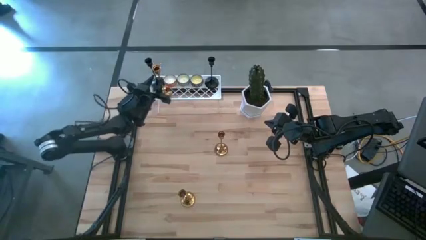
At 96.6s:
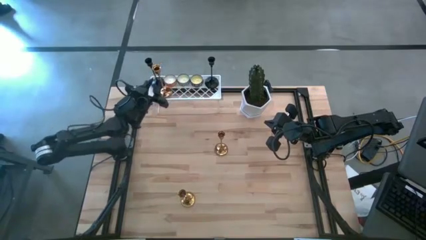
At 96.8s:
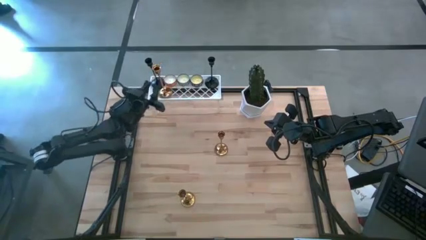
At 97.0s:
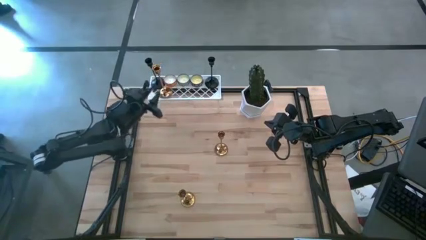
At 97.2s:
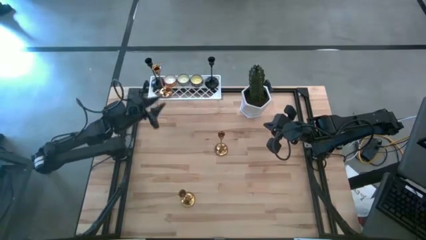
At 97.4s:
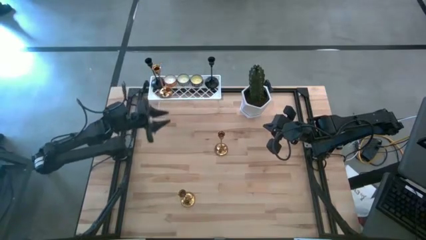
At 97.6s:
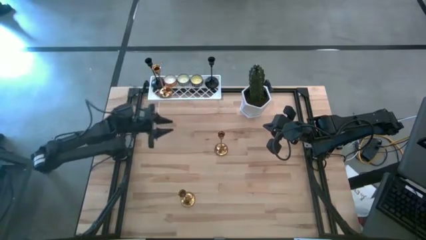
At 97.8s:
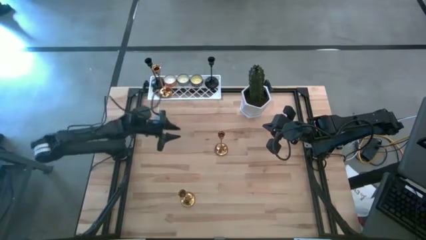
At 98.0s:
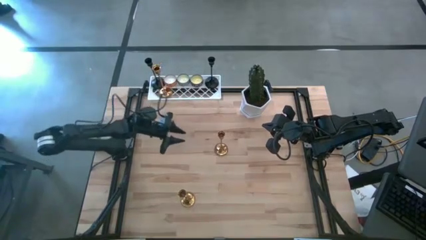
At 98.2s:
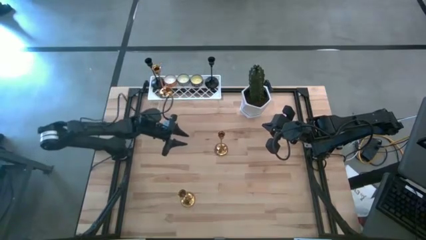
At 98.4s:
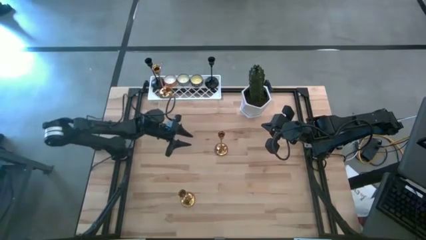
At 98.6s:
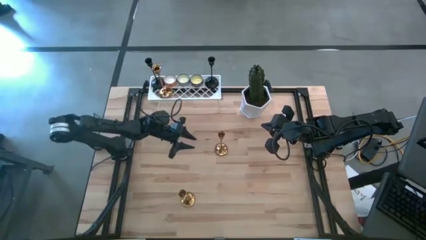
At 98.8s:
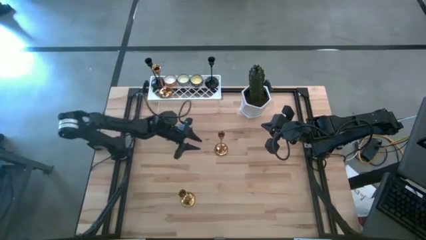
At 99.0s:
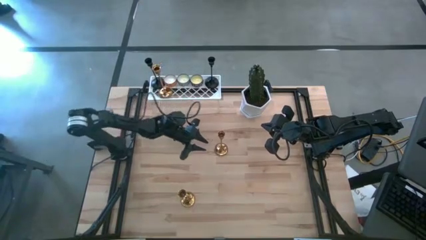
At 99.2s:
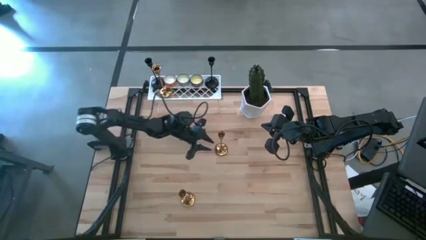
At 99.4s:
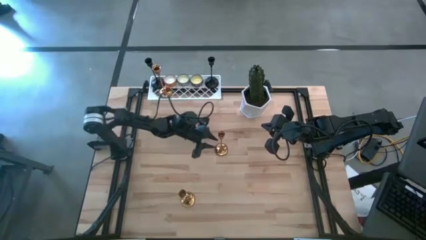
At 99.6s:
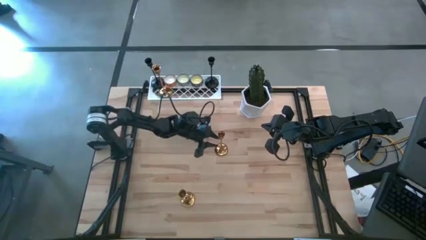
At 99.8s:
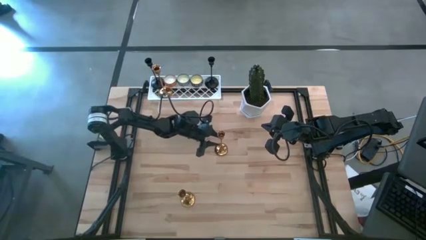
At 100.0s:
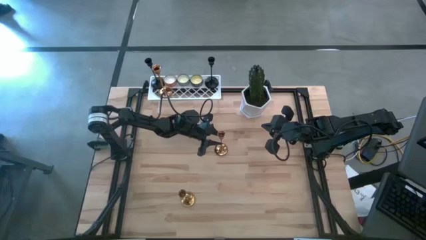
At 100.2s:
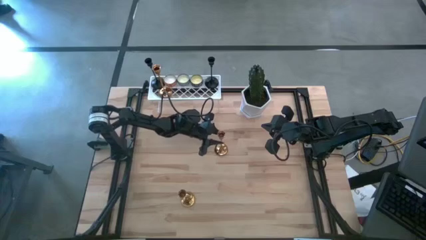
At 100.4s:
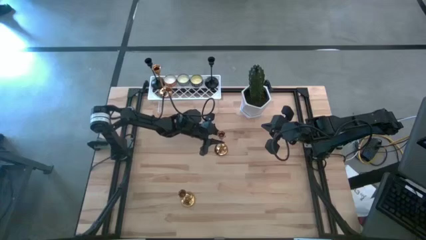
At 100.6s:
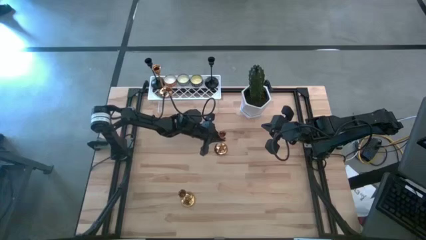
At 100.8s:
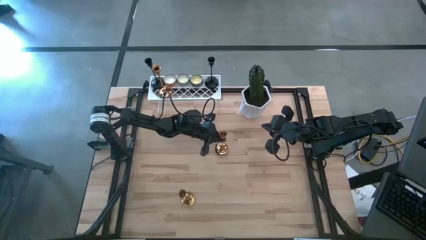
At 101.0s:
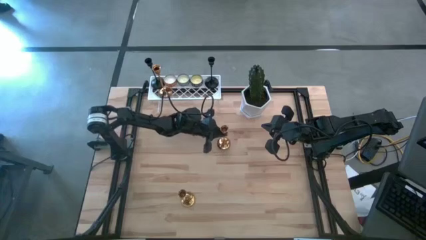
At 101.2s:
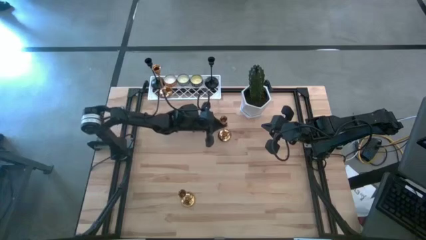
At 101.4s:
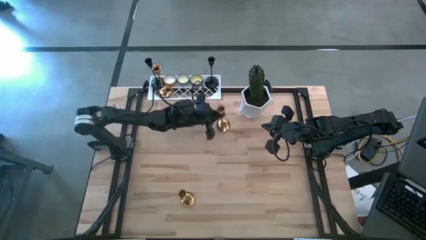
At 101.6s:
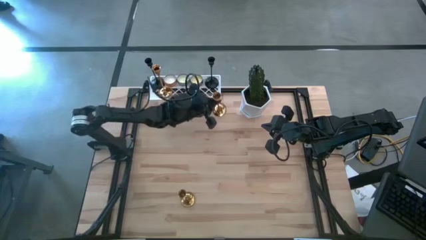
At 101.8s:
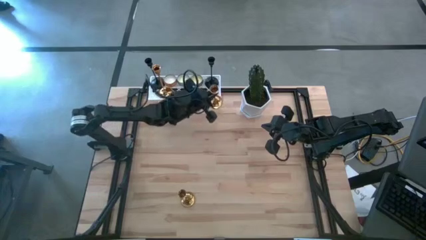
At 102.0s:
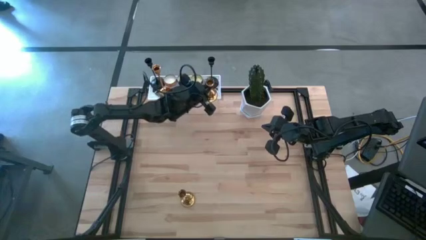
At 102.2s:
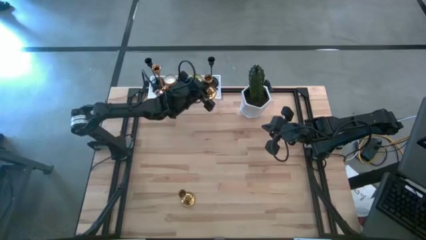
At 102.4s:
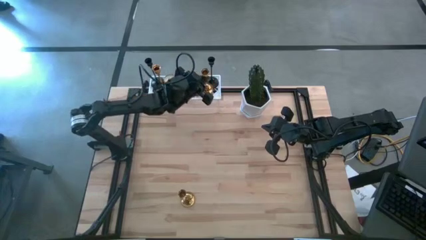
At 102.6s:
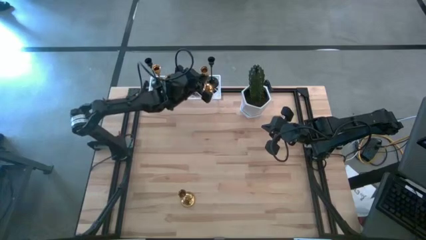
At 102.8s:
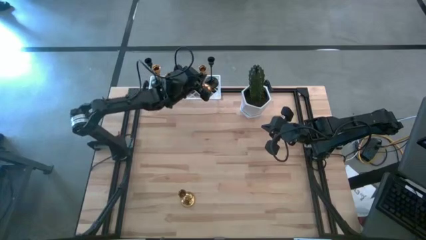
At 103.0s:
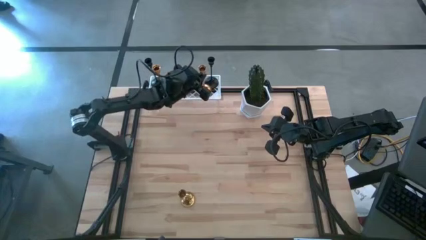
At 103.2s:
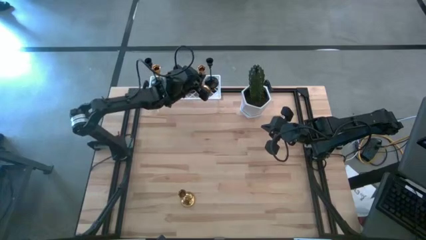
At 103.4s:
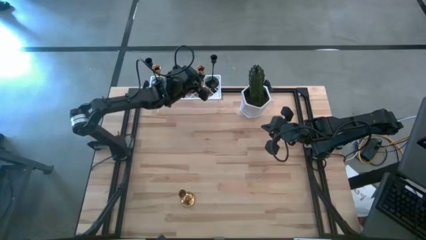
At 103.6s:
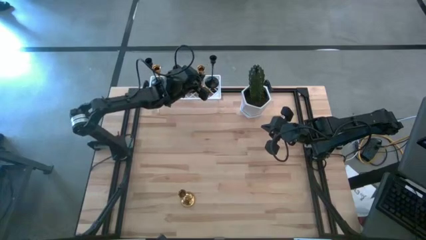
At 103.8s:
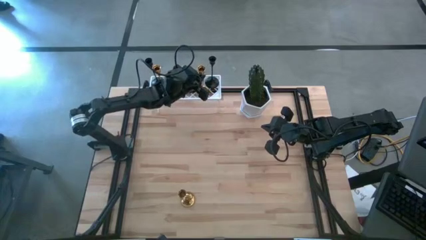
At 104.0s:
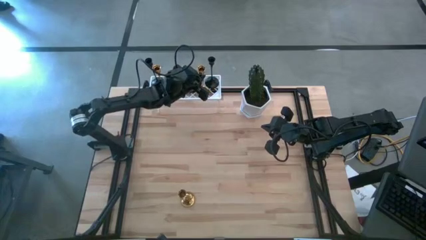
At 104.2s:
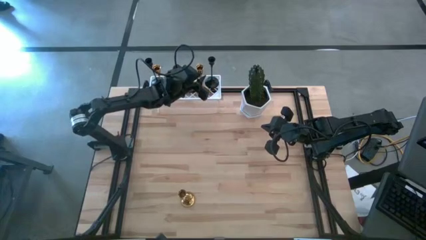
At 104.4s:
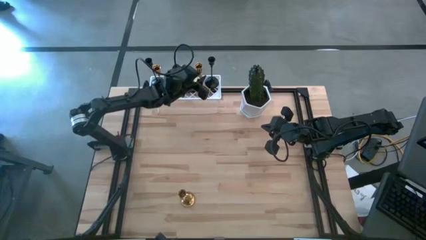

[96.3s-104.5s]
Task: Pick & Place candle stick holders
Put the top golden candle holder on the shelf

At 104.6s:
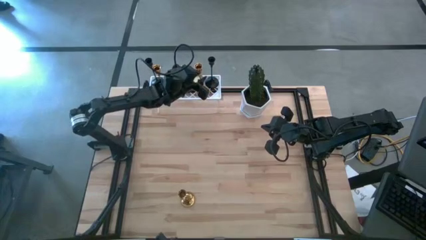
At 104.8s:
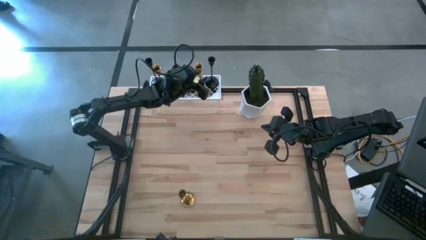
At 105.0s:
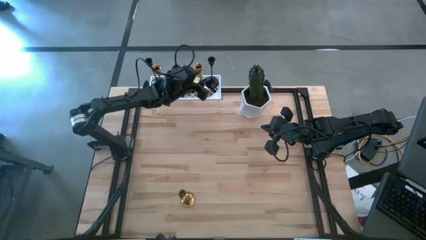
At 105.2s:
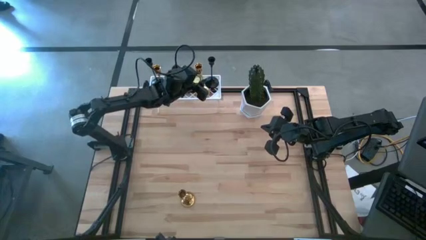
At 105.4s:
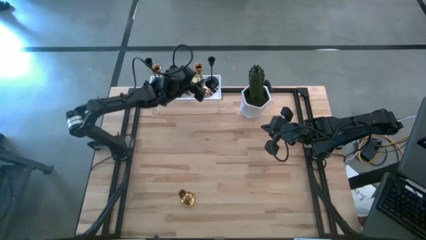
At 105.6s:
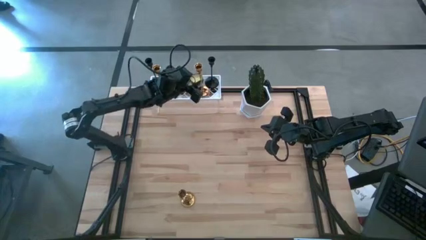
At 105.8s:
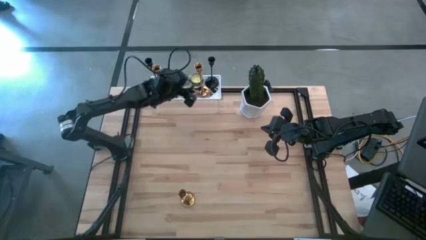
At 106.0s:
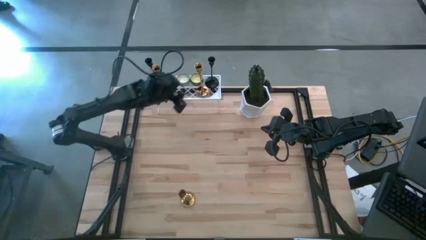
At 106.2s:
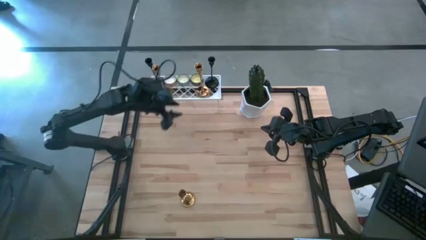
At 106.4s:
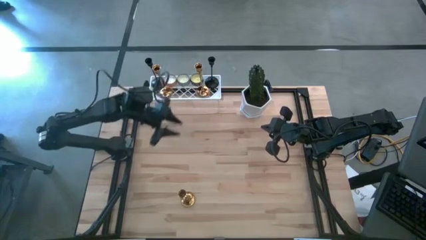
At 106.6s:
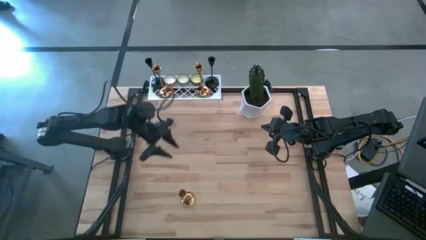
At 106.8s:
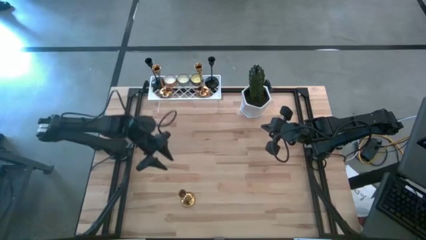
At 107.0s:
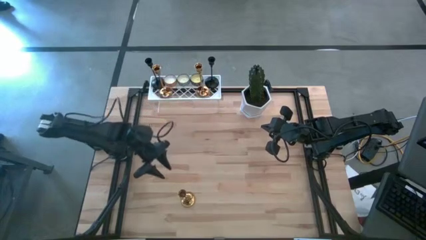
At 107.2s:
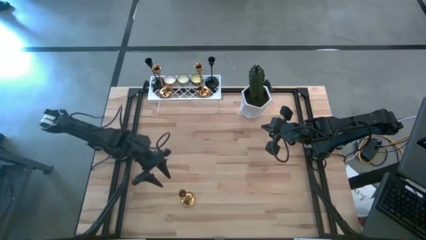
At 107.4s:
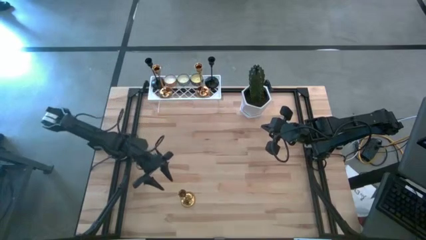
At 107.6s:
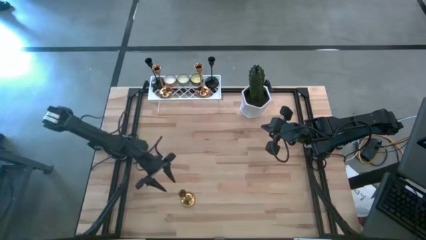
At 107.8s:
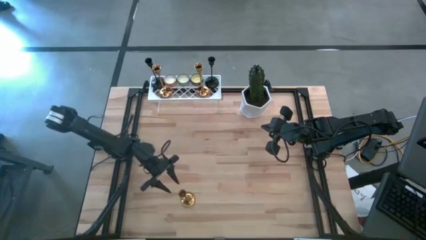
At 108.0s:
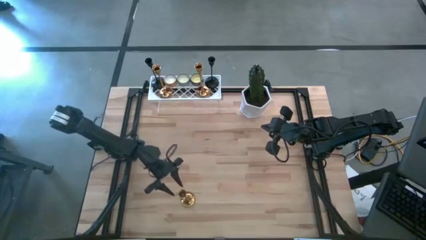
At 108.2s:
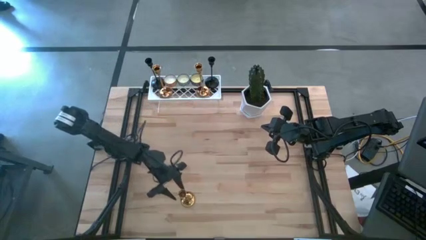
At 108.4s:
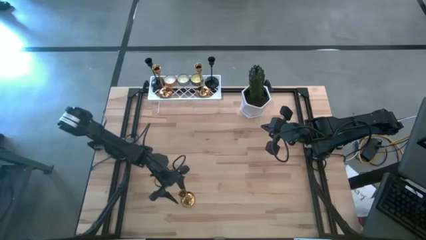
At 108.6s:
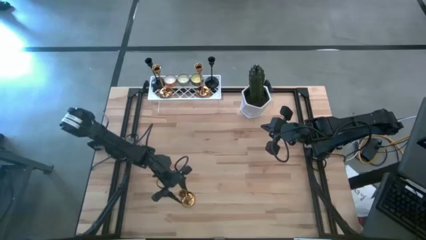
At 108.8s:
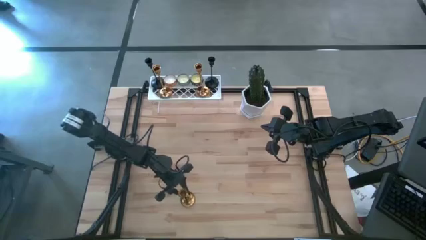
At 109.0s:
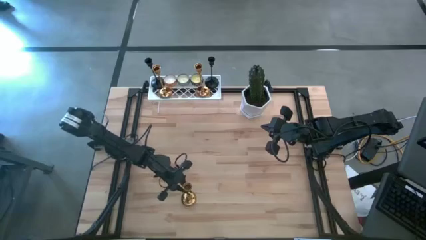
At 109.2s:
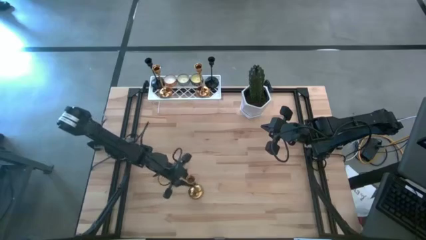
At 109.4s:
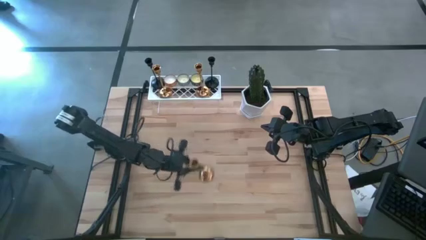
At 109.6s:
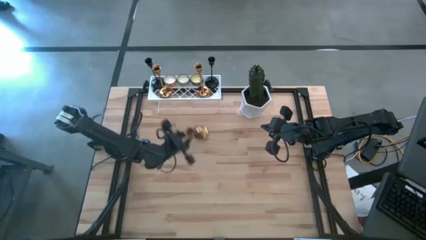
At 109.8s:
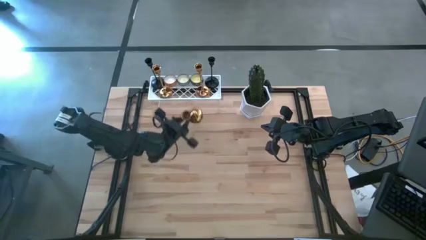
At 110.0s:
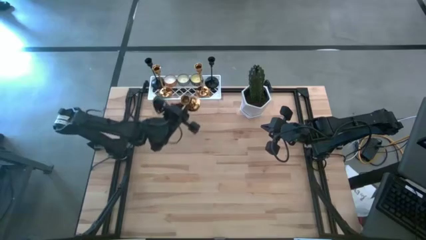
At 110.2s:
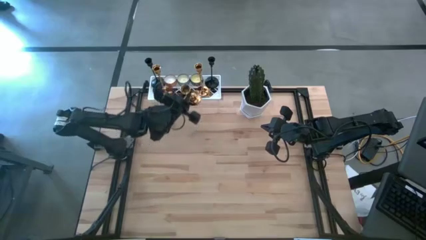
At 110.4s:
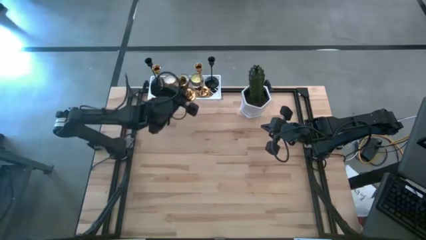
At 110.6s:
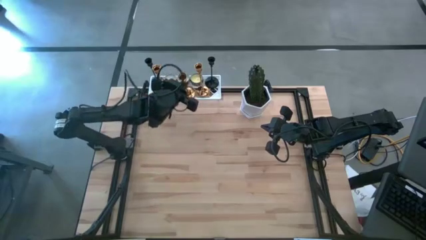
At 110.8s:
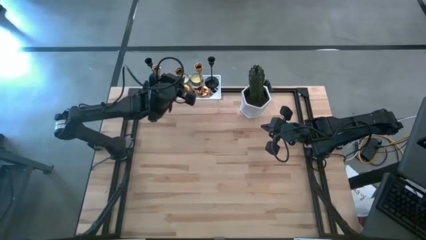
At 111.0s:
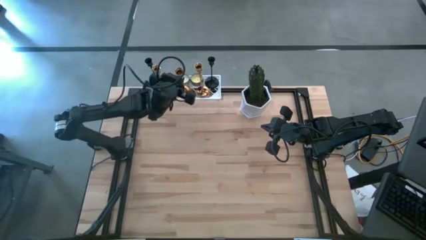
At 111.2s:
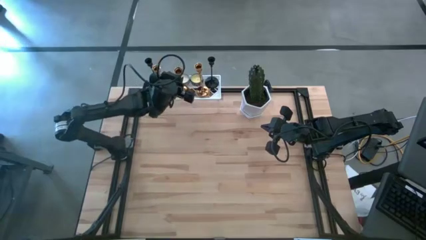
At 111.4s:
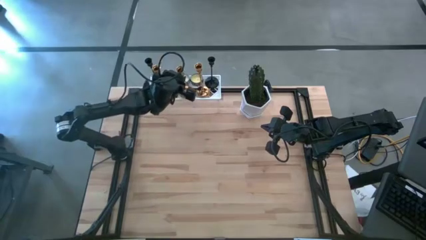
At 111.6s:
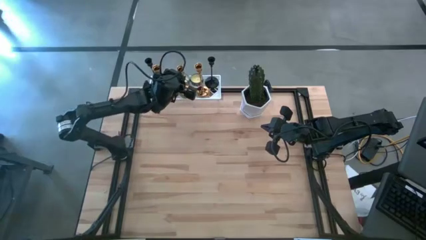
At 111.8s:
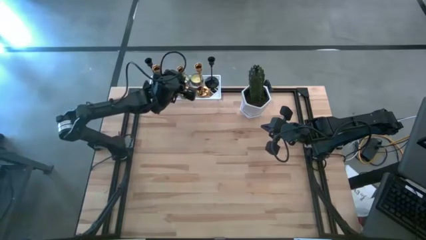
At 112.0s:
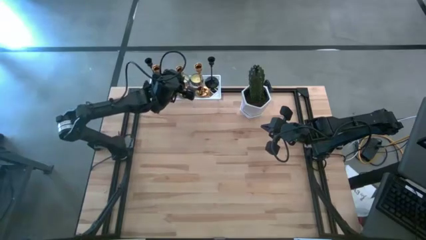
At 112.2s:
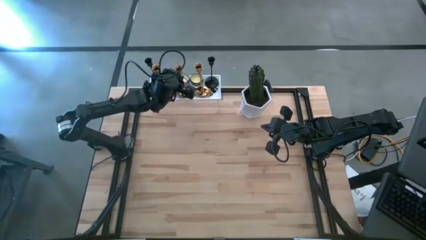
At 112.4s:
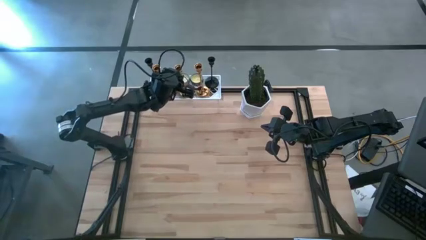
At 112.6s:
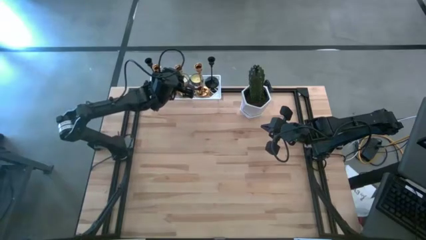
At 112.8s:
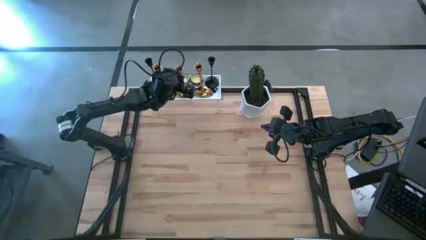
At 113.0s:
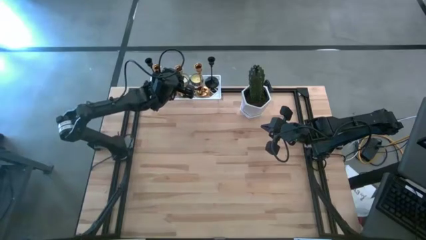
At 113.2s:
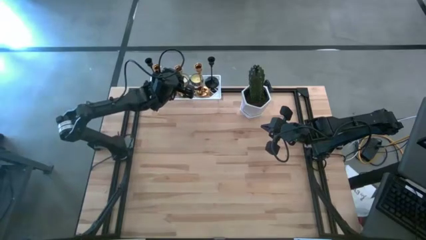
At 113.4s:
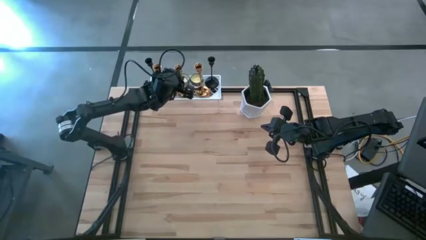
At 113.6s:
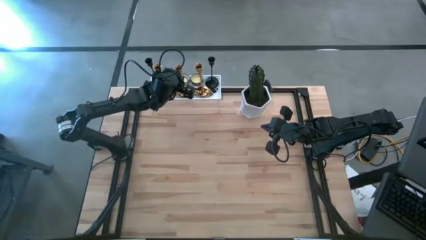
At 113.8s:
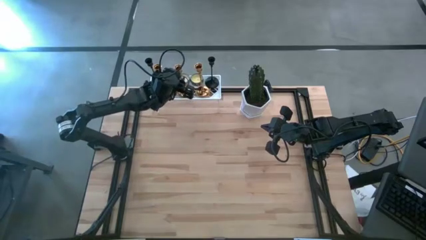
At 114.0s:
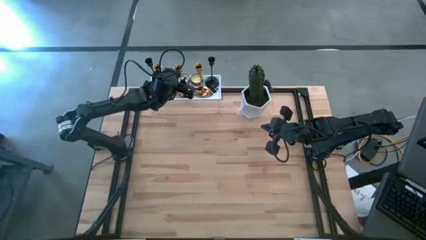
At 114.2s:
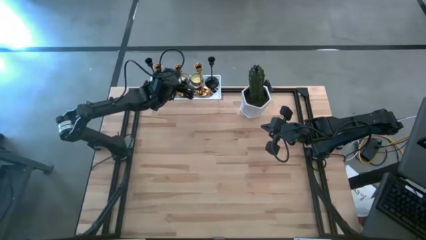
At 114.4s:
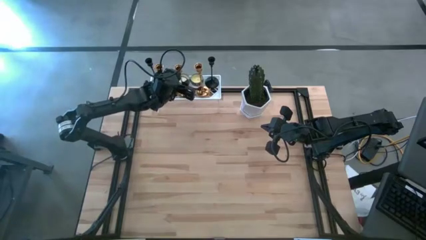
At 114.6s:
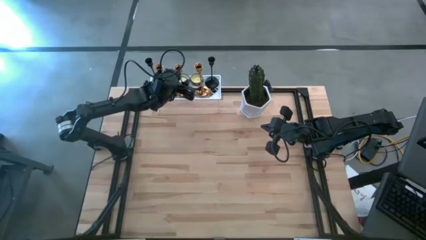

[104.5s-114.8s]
Put the golden candle holder on the shelf
